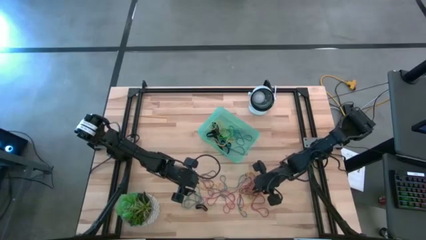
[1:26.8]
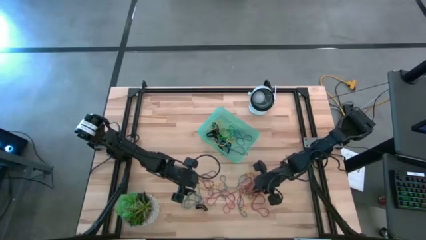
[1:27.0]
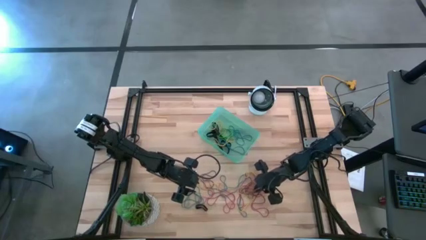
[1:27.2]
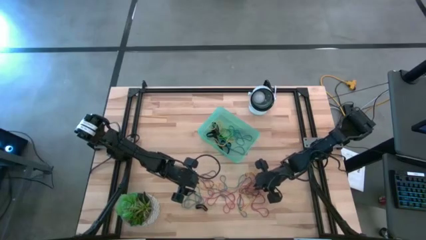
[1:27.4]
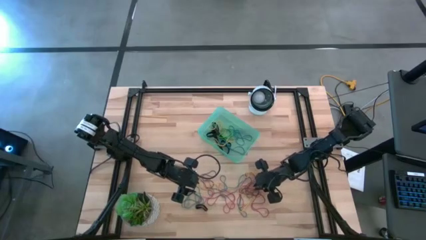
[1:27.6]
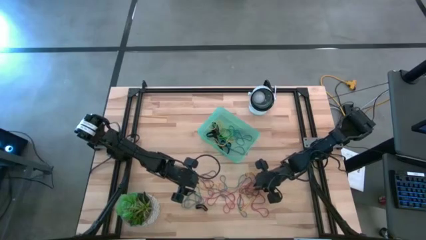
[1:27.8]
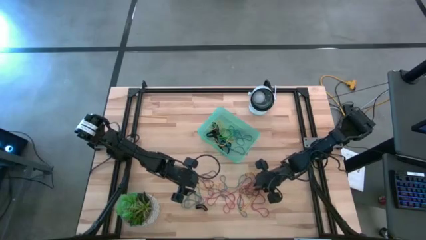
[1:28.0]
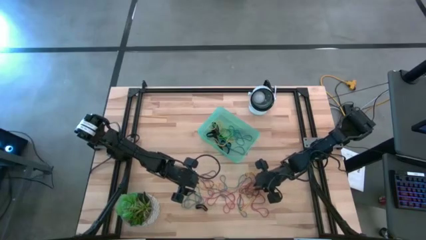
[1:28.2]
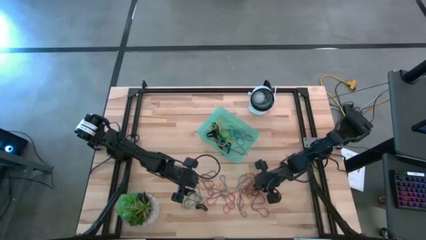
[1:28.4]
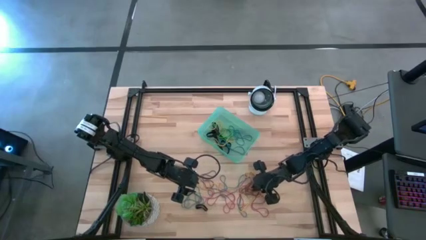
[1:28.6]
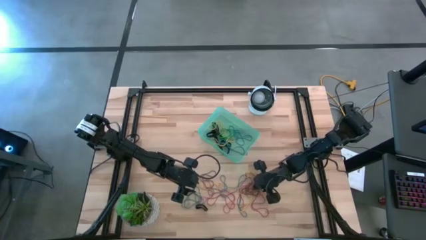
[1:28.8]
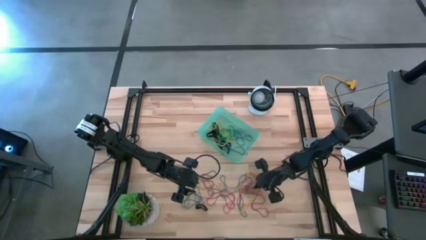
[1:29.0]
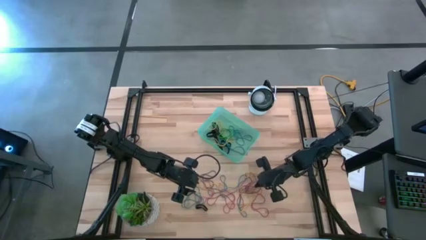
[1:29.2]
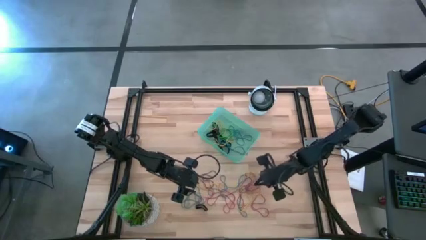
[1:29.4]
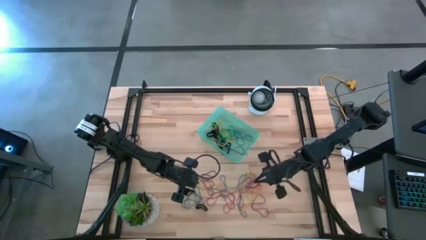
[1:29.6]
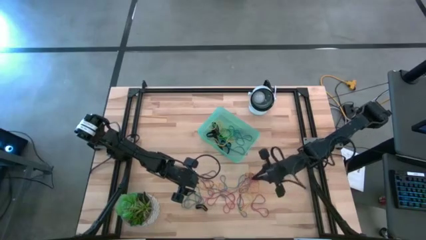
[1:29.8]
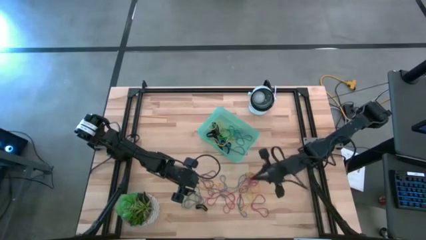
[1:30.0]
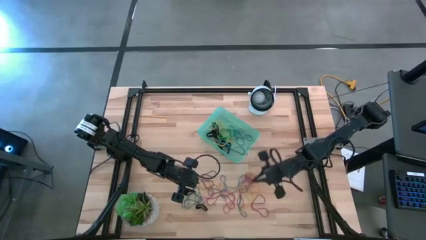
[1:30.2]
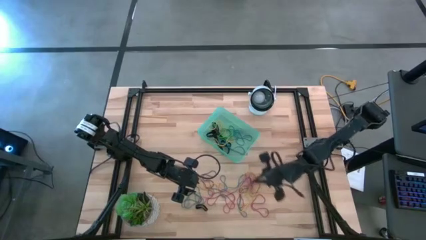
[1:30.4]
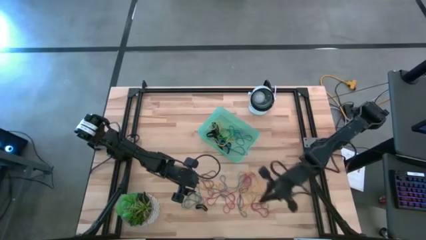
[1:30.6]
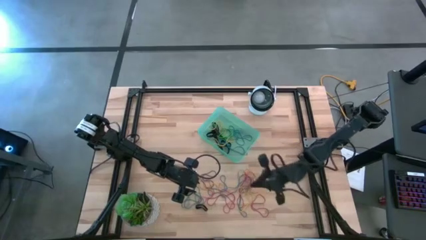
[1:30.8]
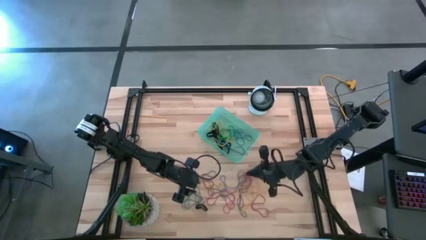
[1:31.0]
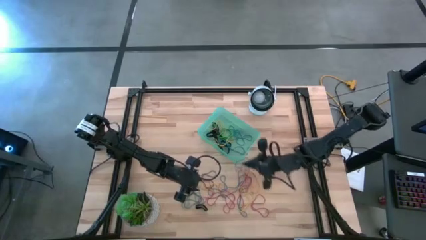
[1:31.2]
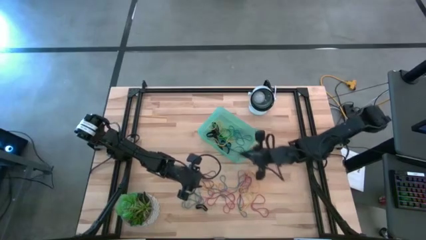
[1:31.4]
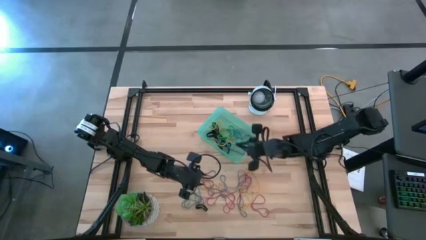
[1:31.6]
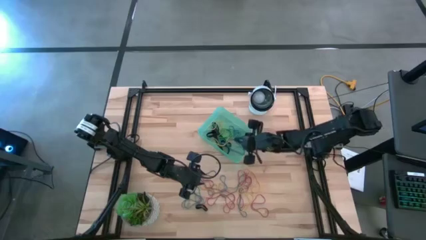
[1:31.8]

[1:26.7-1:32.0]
Task: Pick and place rubber bands into bin
Put the violet rubber band into the blue bin

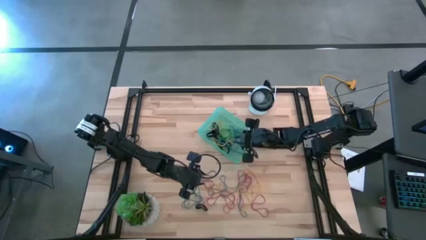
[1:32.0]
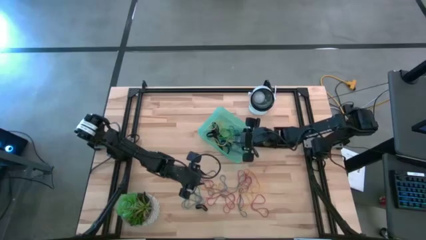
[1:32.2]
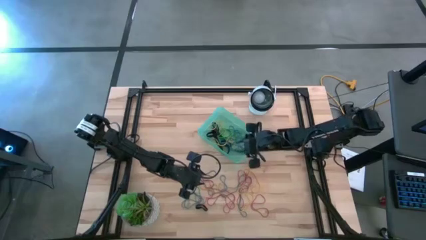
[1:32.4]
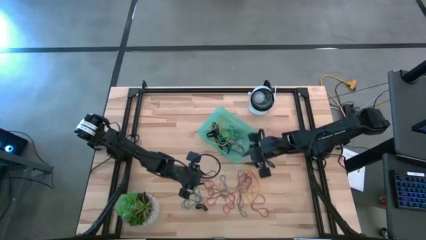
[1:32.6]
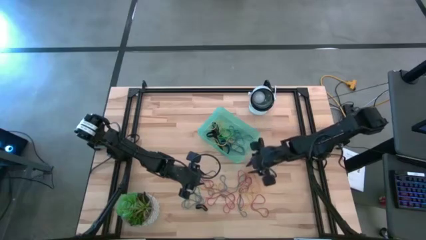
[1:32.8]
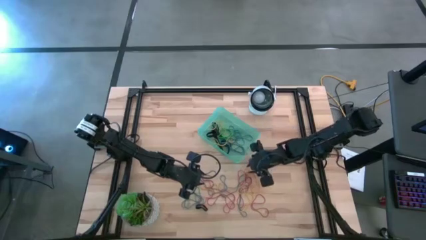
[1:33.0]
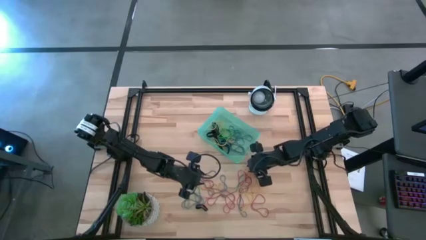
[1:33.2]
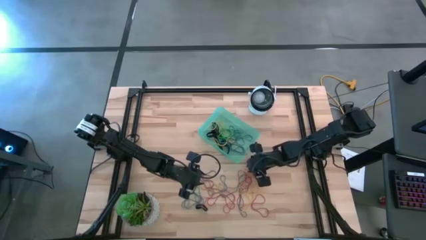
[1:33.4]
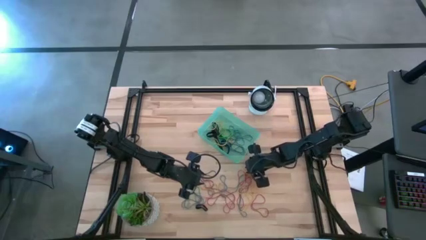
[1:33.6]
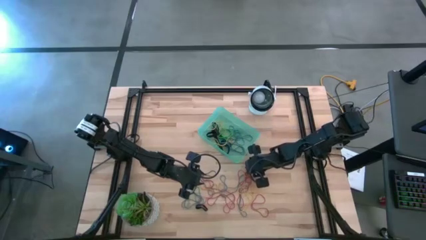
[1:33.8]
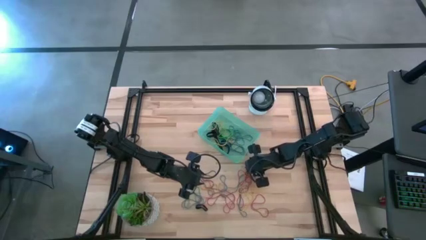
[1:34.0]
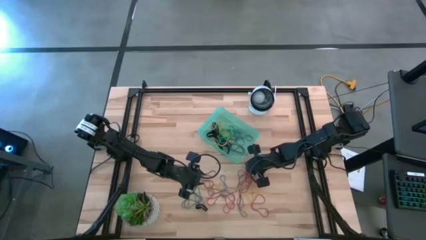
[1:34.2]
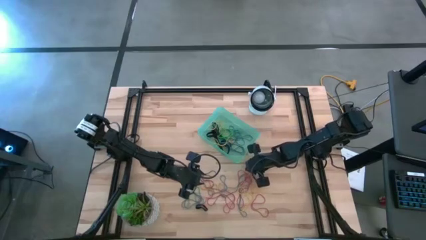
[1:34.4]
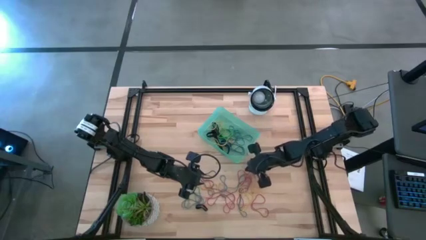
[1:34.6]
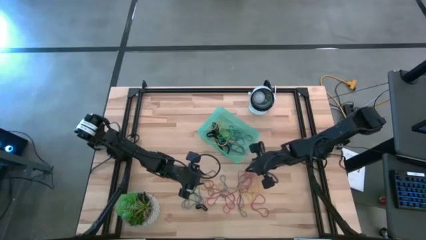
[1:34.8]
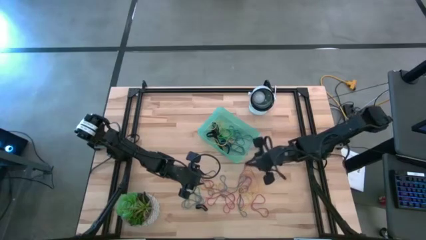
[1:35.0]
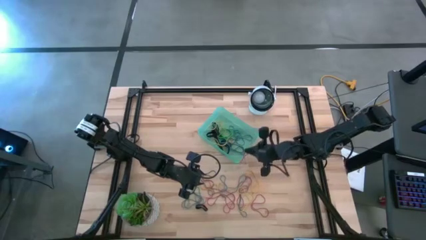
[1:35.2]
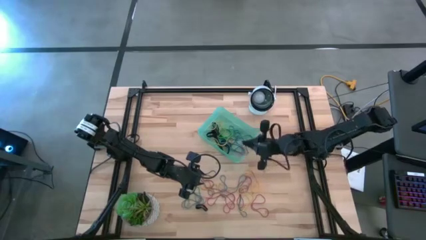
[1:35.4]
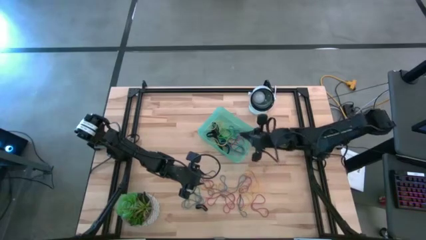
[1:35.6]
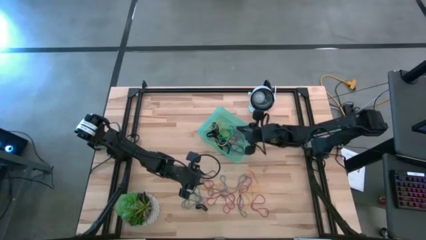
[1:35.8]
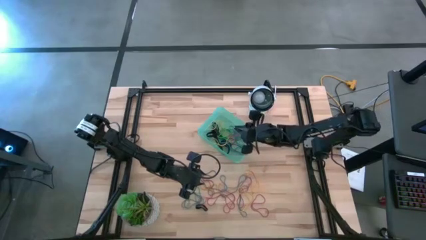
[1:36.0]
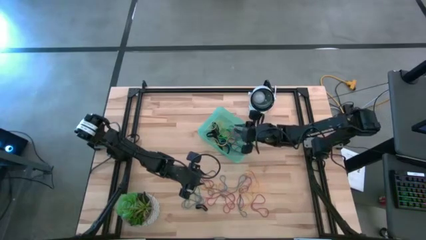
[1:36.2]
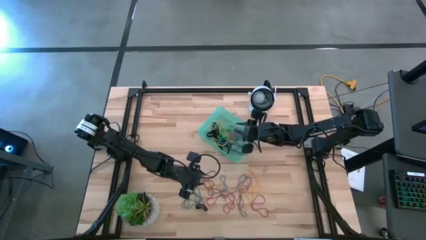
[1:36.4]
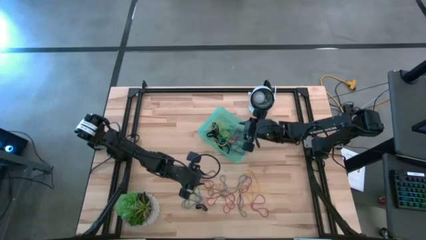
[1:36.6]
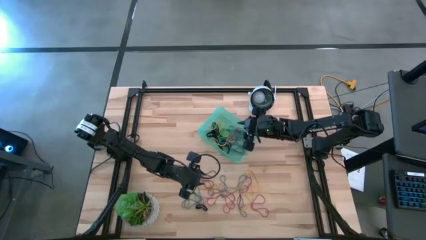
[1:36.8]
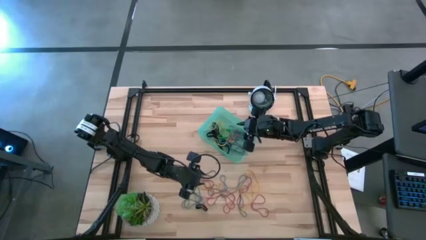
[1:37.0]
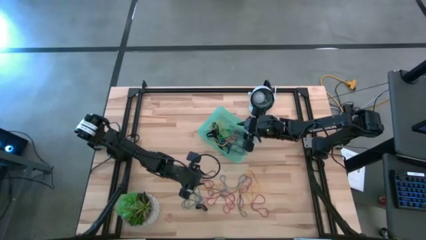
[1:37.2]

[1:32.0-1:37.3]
Put the red rubber band into the blue bin

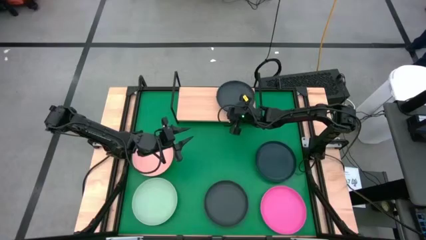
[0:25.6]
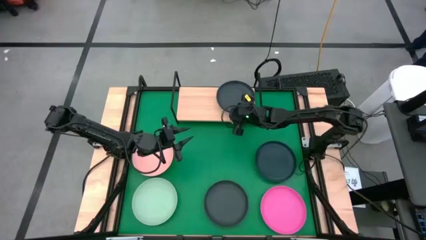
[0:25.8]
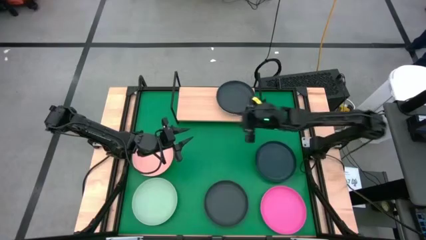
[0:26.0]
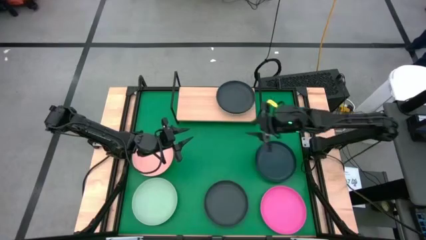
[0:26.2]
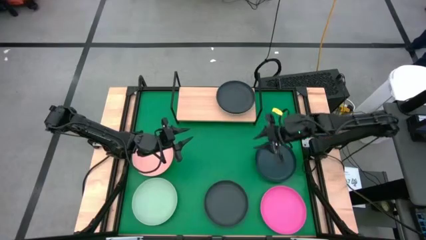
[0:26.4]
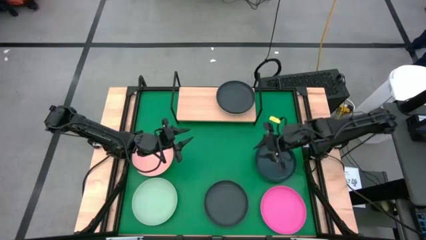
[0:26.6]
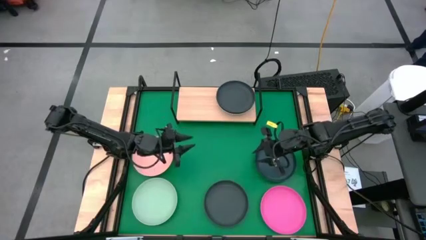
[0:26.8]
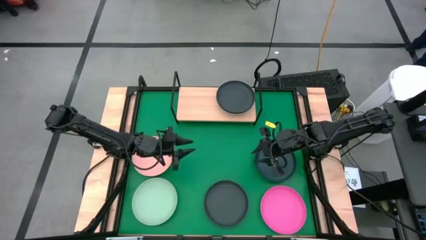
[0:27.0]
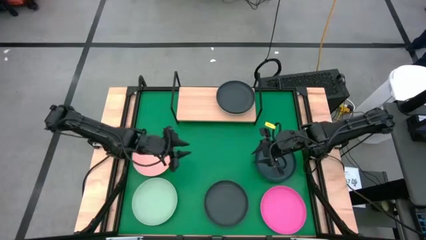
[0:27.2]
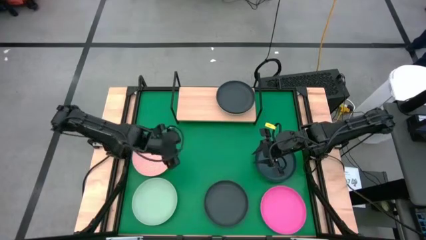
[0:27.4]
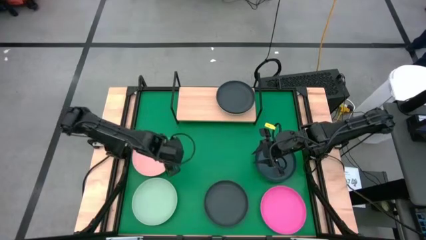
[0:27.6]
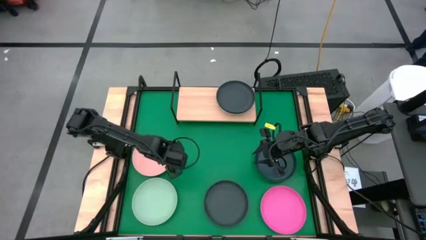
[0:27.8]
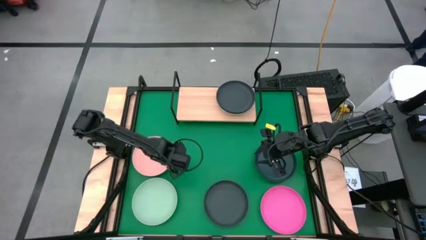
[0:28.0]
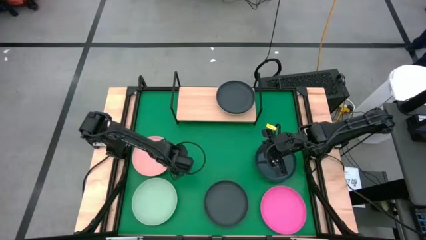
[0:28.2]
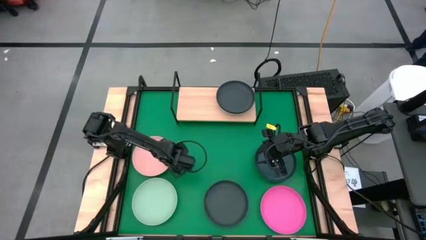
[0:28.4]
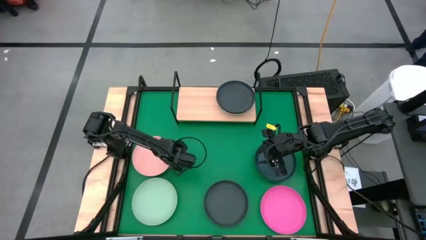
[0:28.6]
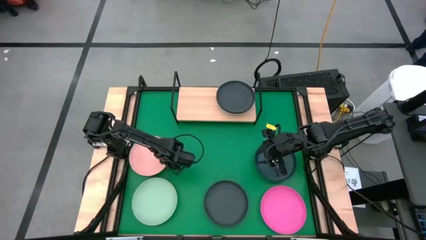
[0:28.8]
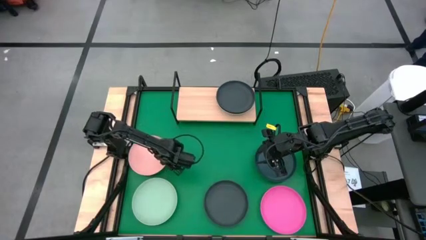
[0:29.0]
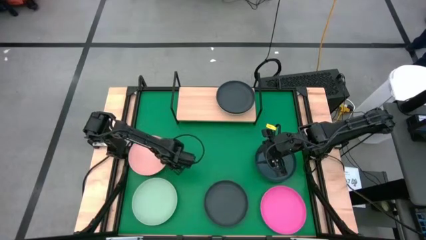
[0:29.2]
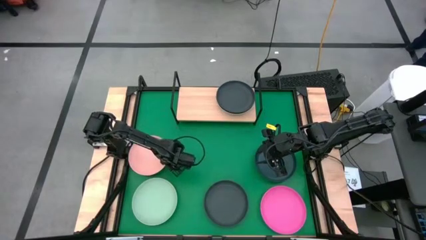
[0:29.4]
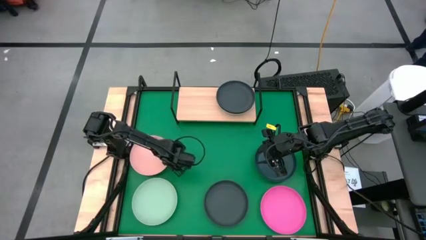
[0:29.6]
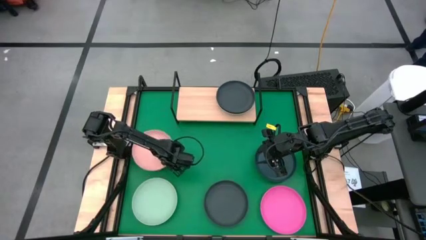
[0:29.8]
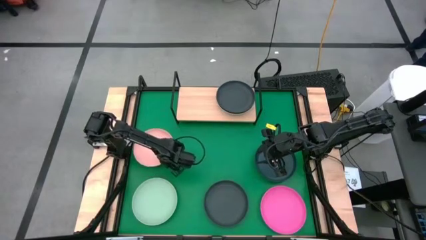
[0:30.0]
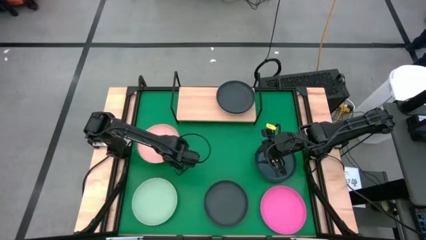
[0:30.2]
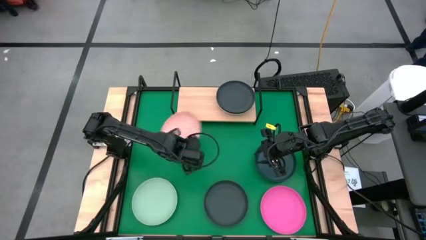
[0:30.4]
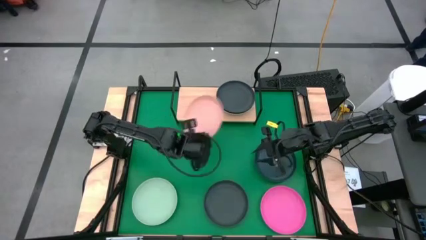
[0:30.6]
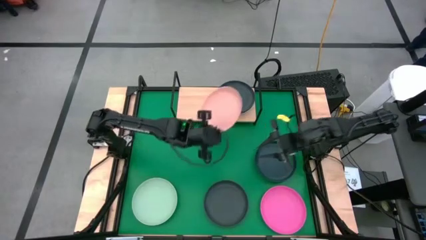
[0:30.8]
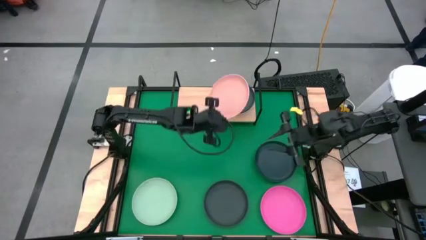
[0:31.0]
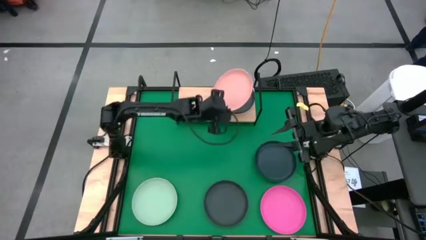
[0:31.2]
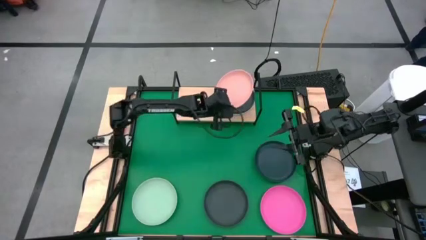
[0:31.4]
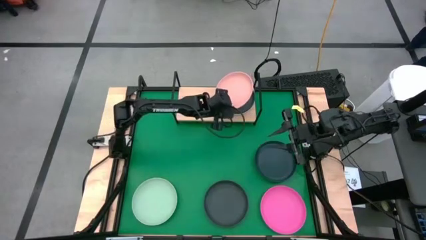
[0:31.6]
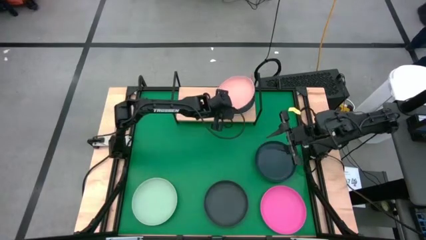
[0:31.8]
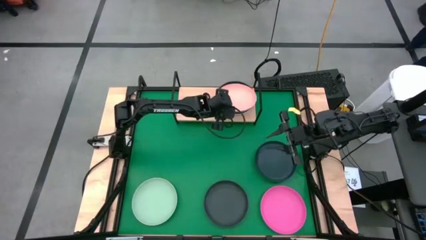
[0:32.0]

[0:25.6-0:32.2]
Task: Place and stack plates onto a shelf
Stack the orange plate on top of the black plate on the shelf
